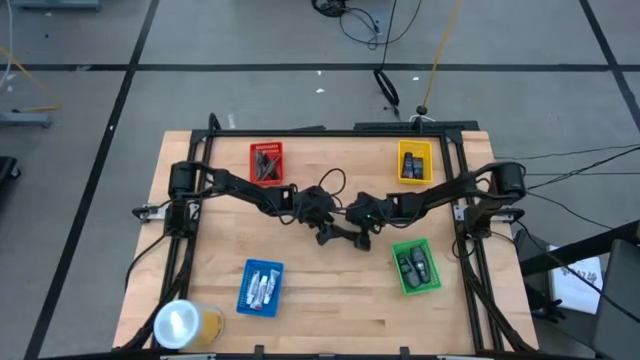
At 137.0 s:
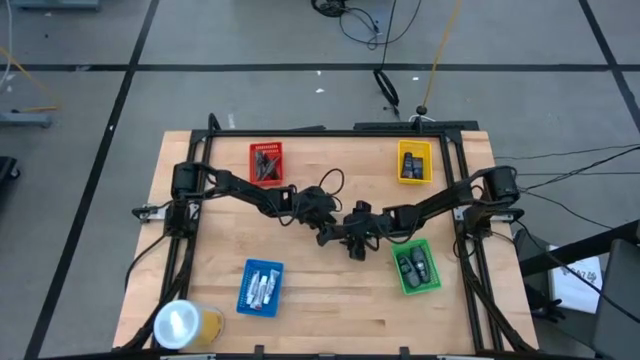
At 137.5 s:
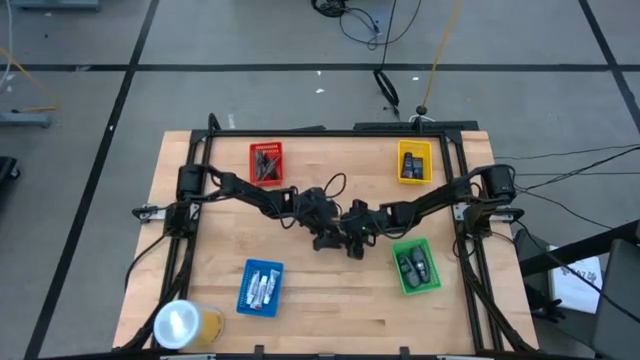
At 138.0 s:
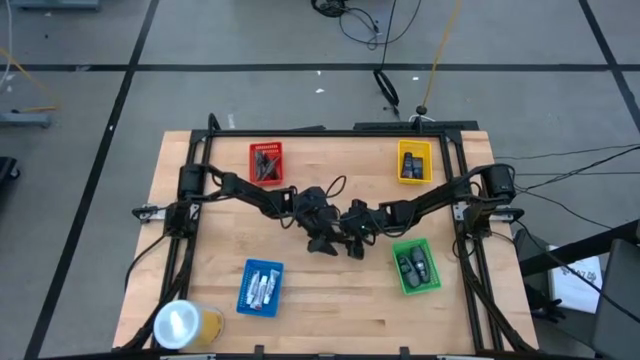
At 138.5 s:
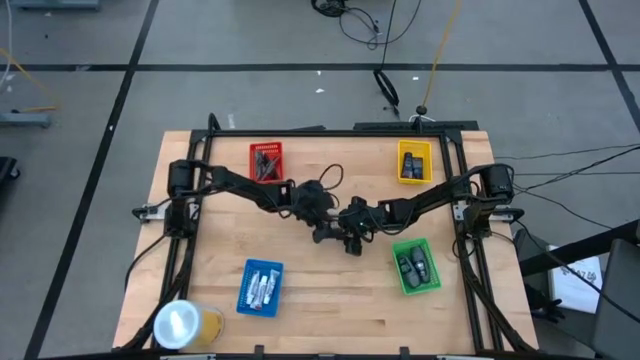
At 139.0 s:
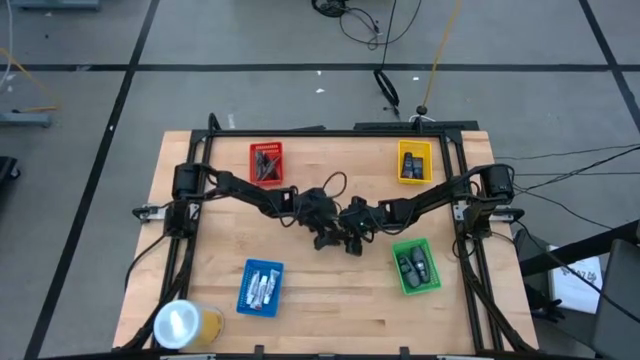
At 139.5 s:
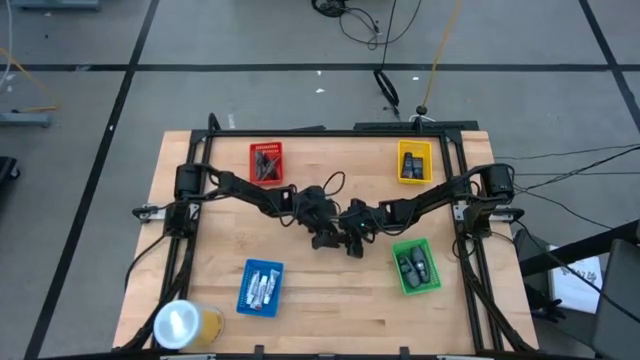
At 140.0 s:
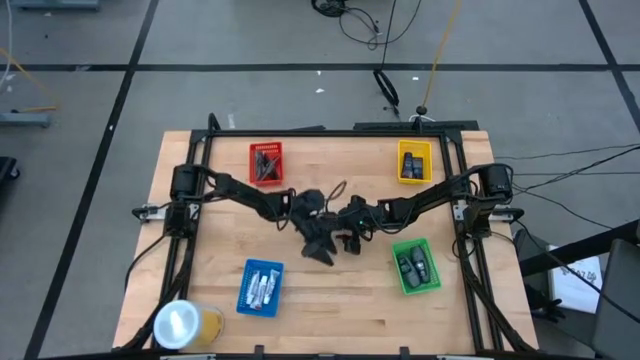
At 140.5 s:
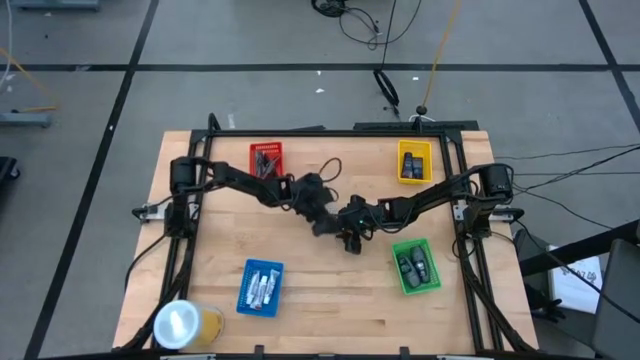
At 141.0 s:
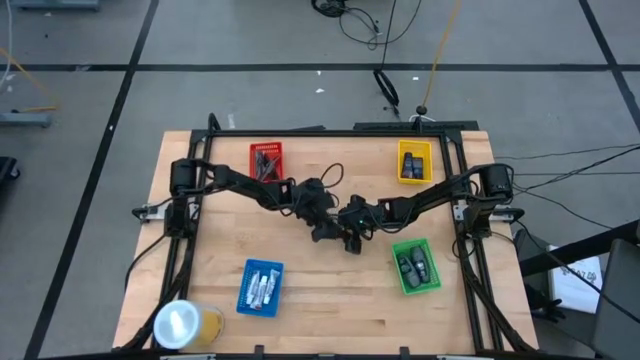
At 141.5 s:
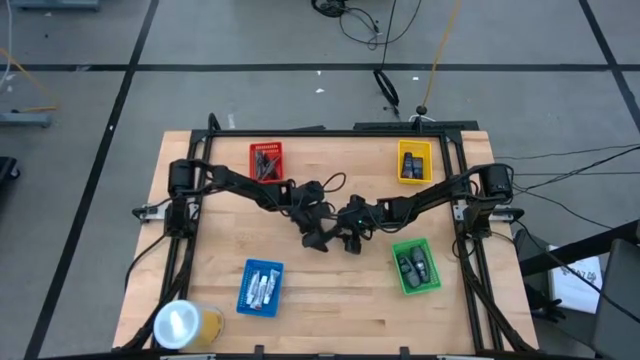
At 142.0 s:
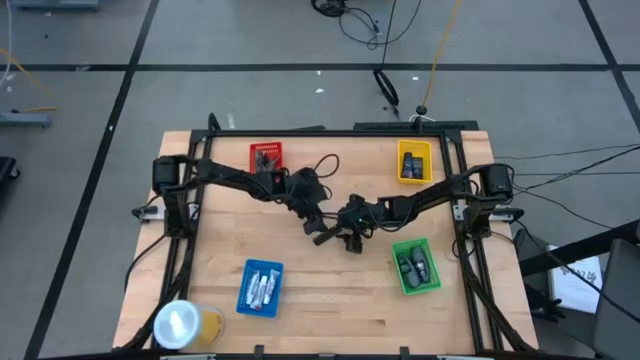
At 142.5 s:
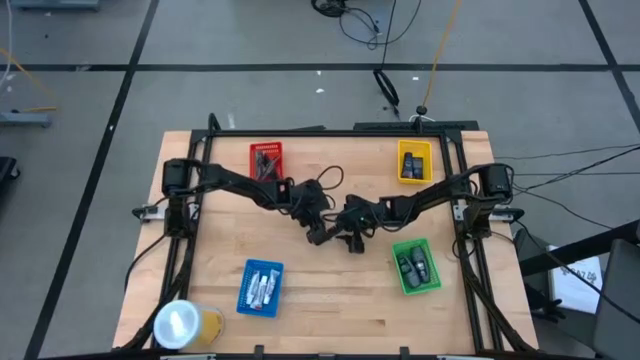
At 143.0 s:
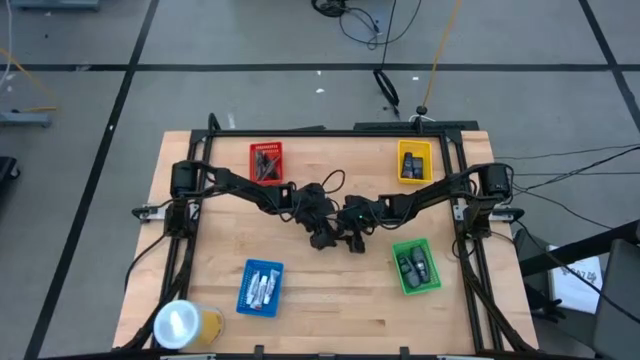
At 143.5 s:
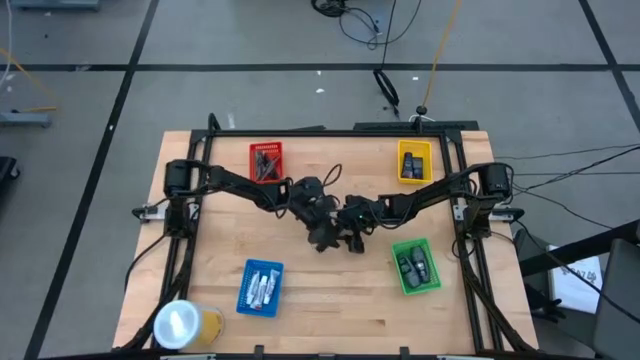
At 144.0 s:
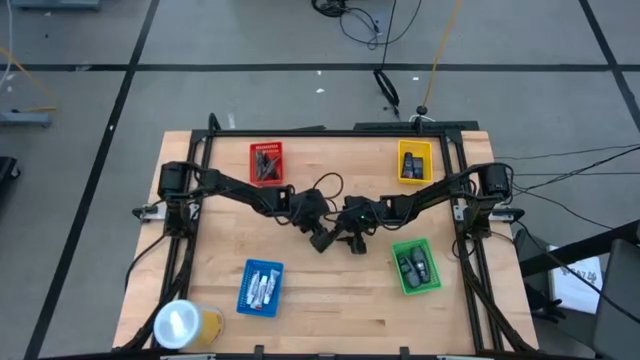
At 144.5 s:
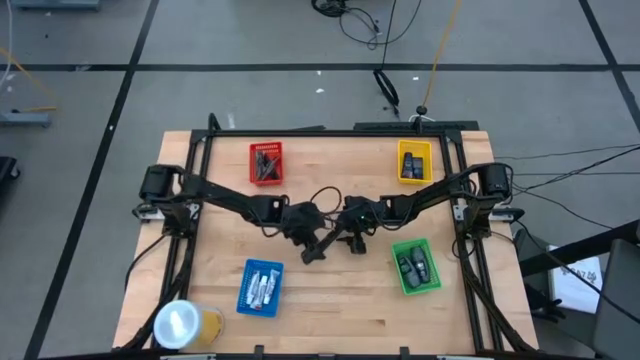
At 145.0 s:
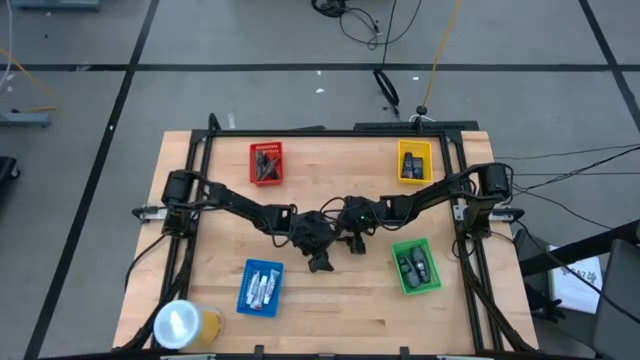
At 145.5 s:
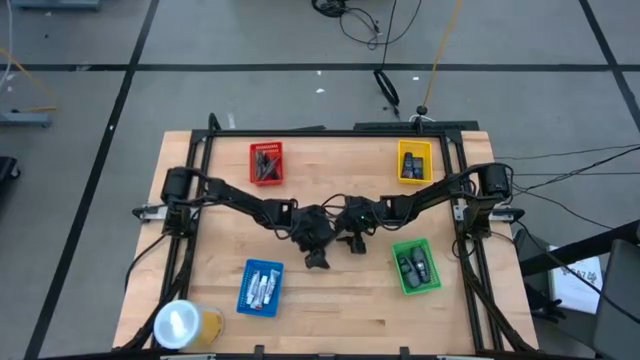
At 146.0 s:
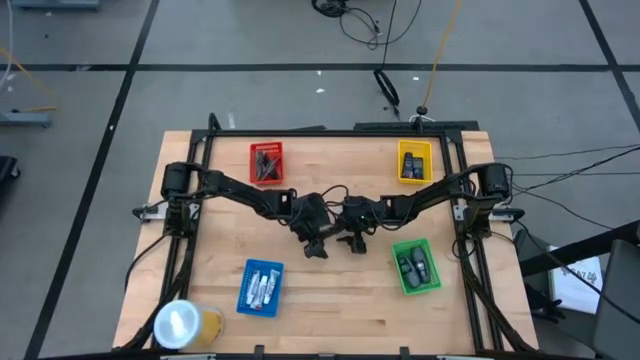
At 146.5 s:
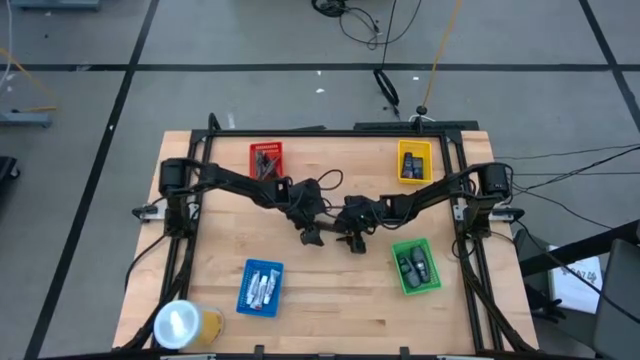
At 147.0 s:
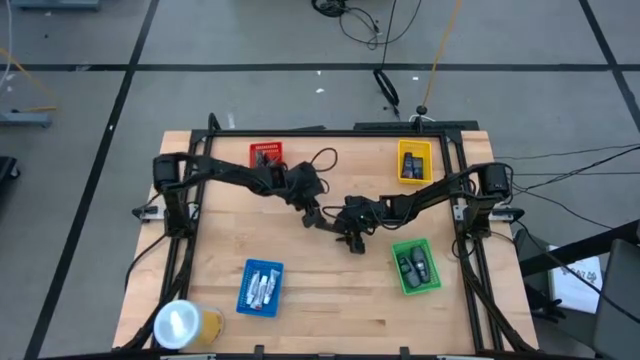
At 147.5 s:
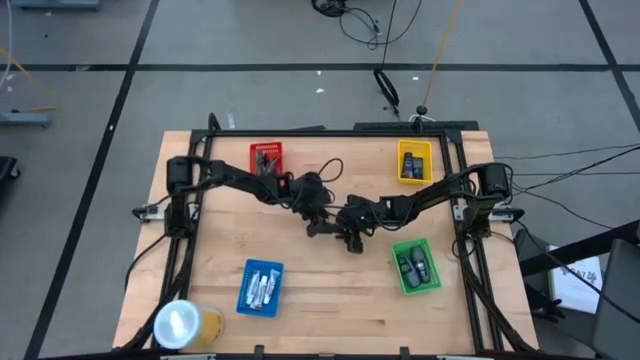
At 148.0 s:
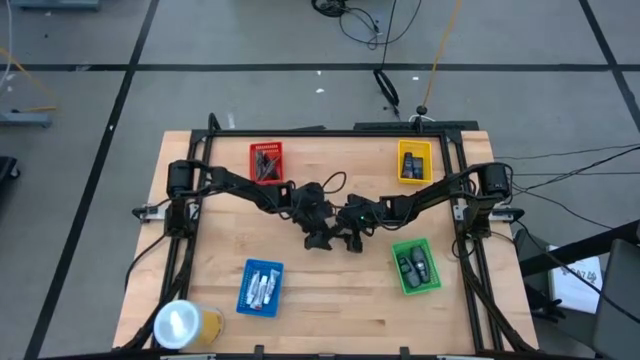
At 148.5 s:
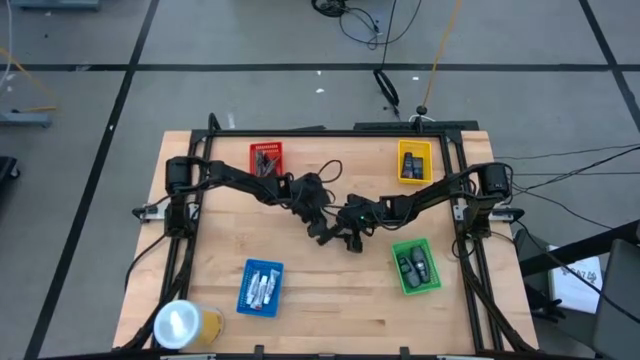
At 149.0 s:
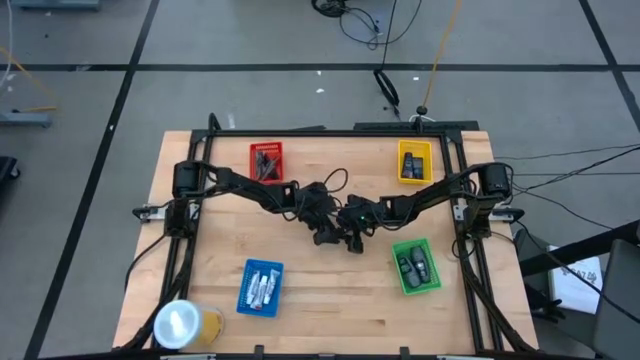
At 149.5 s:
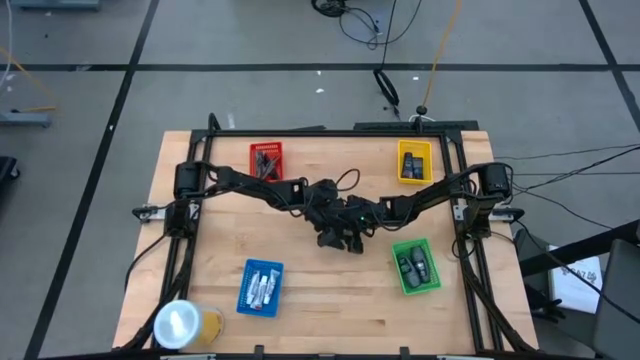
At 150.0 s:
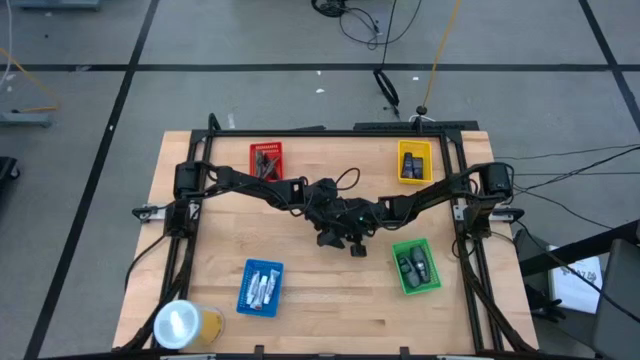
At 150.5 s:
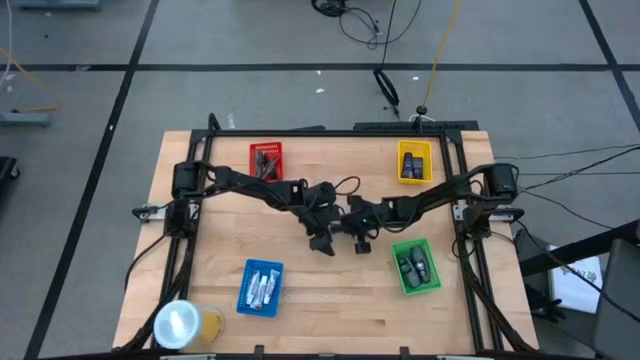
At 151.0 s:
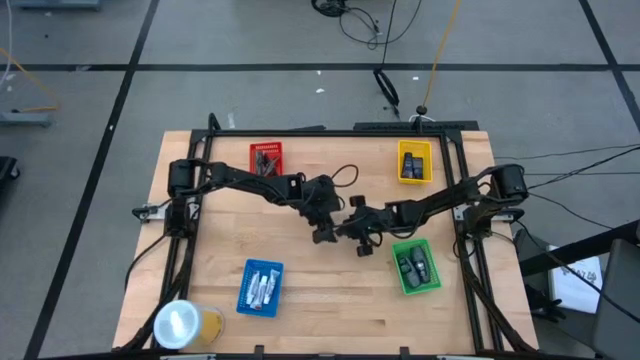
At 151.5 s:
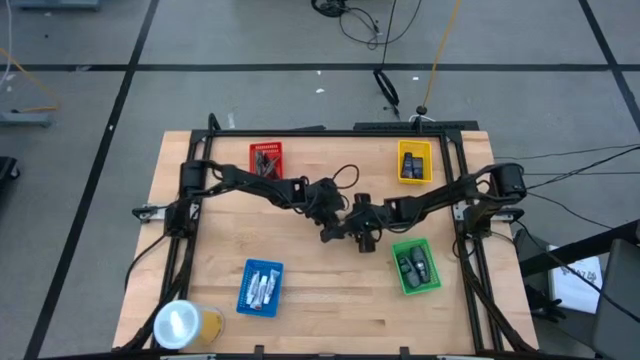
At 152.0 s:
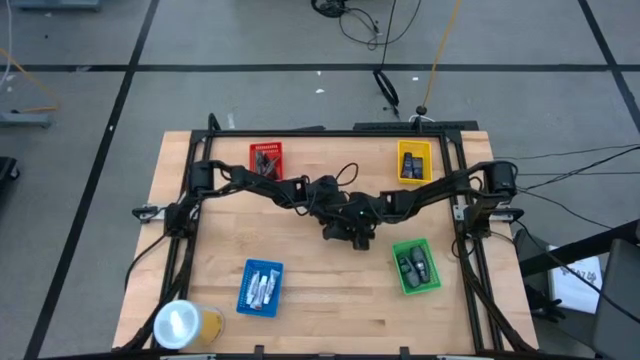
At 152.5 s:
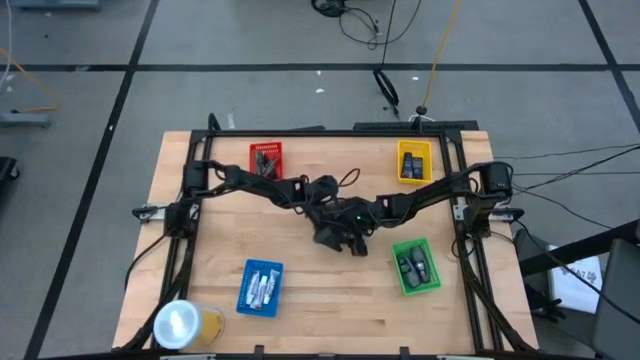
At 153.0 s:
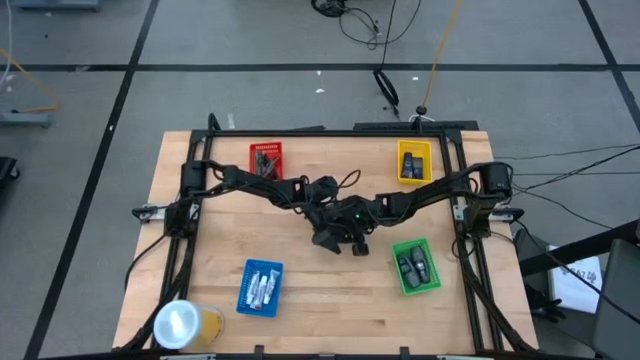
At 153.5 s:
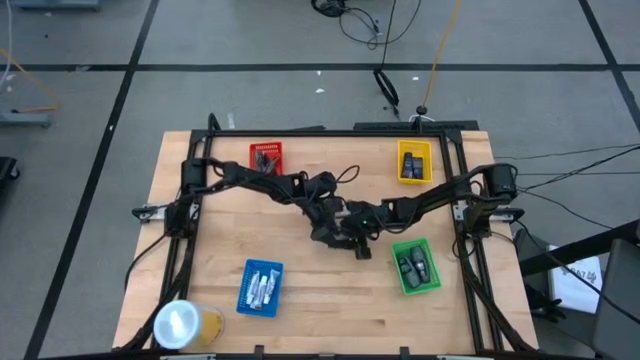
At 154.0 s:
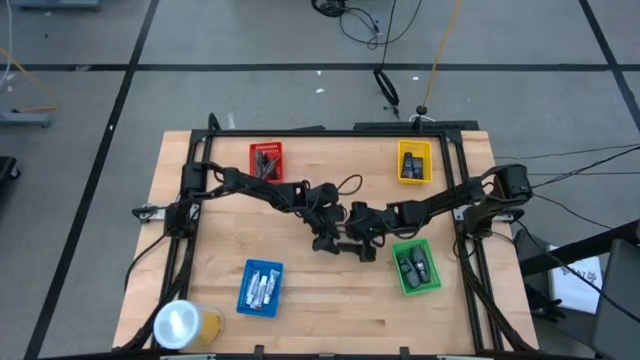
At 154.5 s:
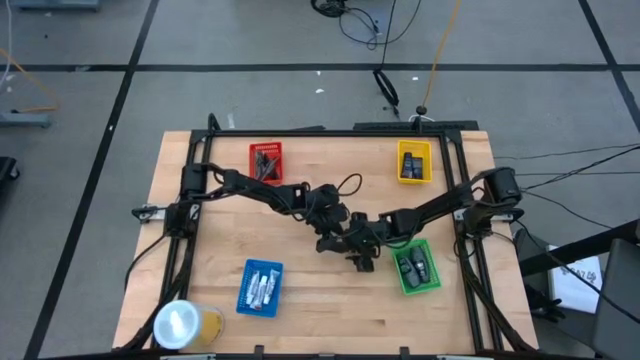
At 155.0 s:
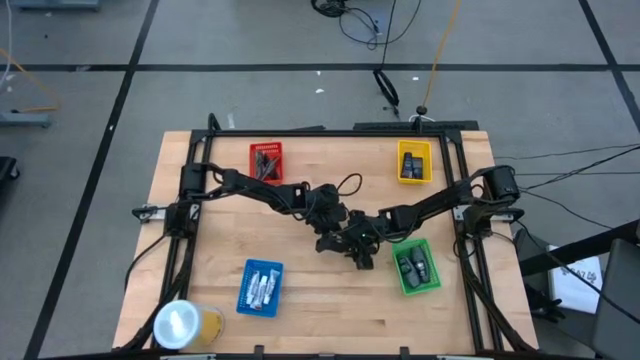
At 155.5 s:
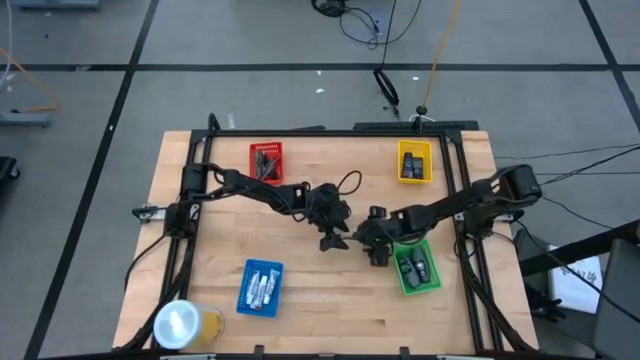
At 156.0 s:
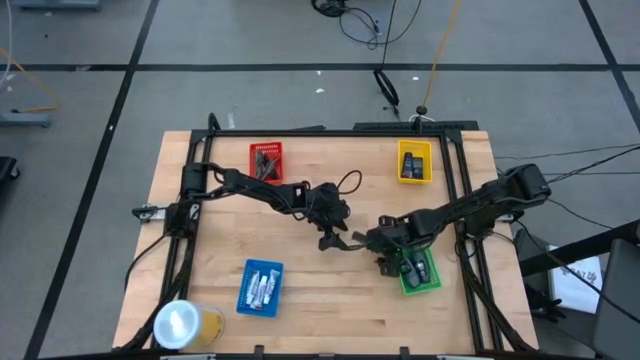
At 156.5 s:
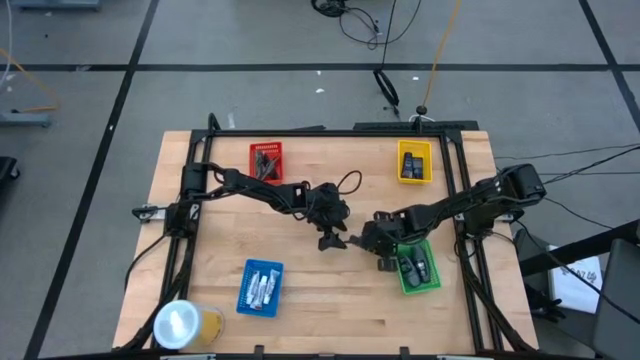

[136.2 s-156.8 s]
Task: Pick & Place Travel size toiletries
Put the black comb into the orange basket
